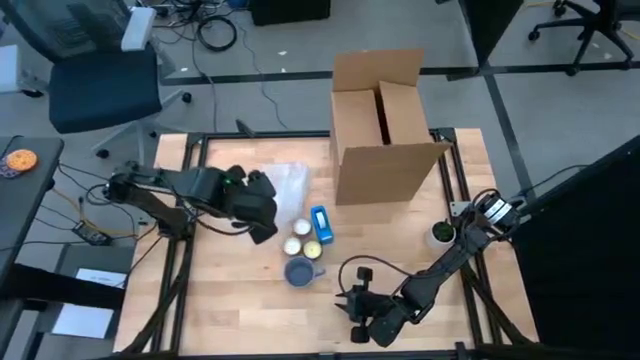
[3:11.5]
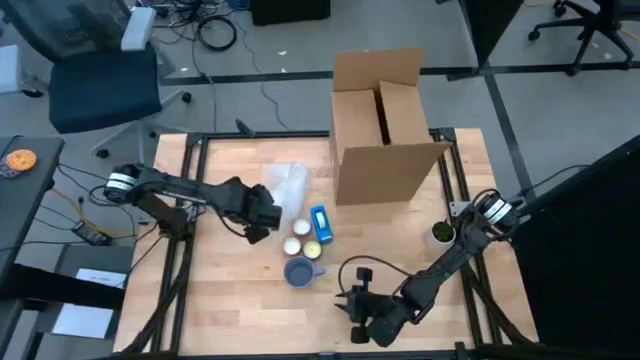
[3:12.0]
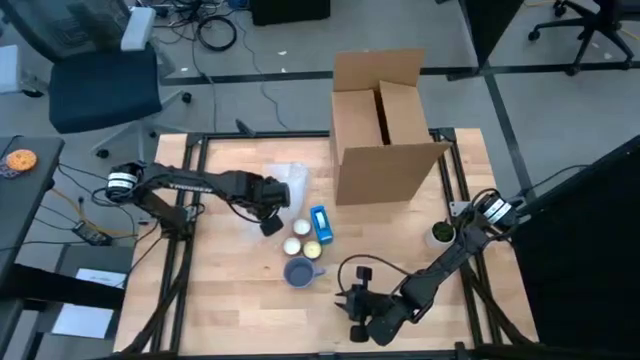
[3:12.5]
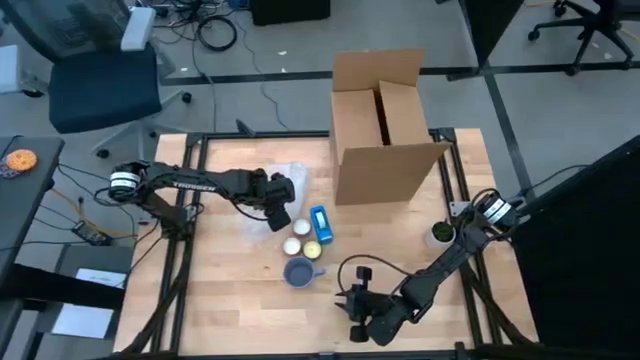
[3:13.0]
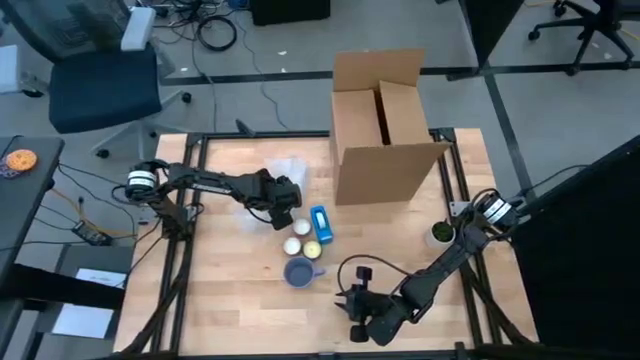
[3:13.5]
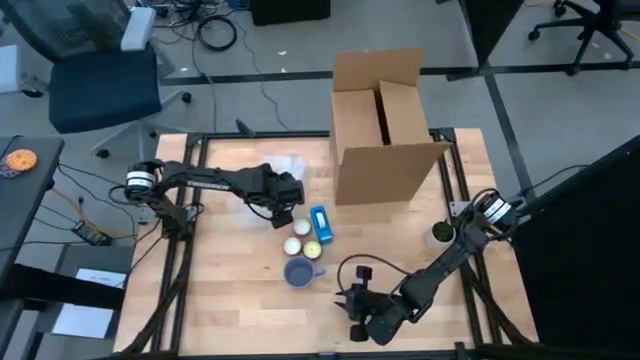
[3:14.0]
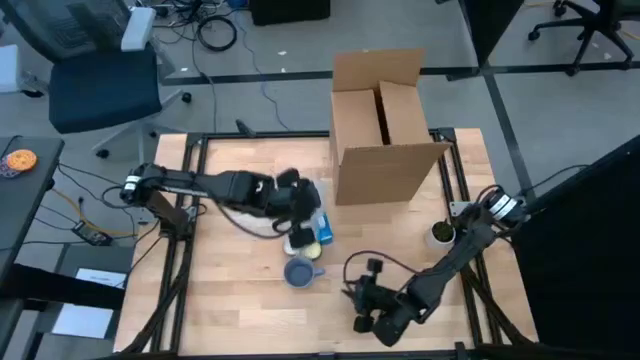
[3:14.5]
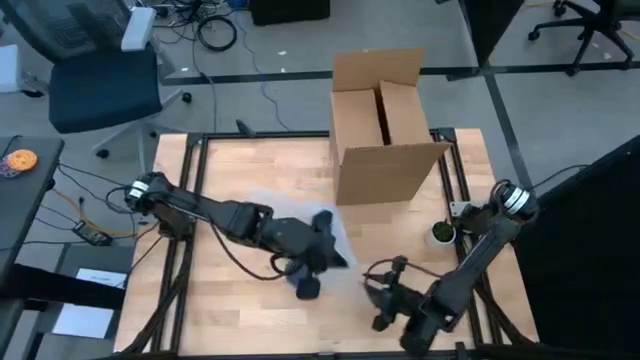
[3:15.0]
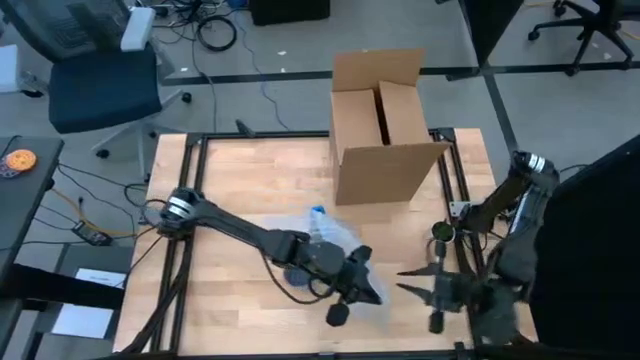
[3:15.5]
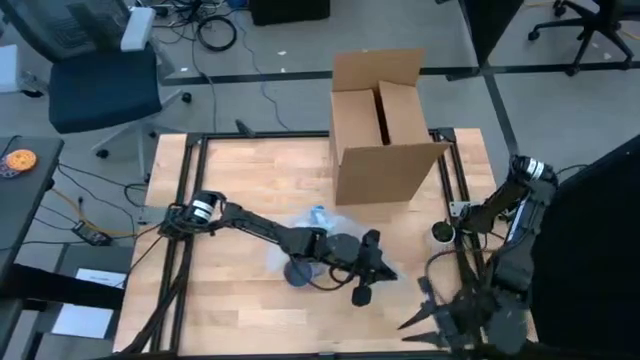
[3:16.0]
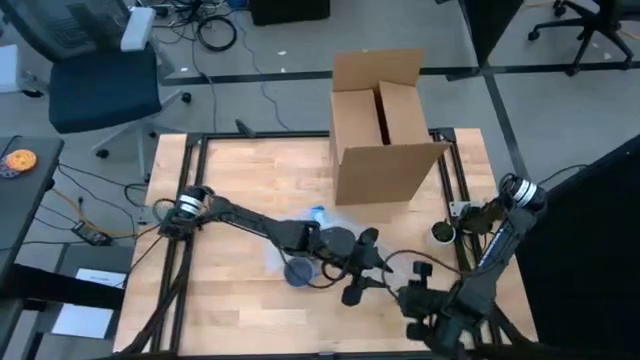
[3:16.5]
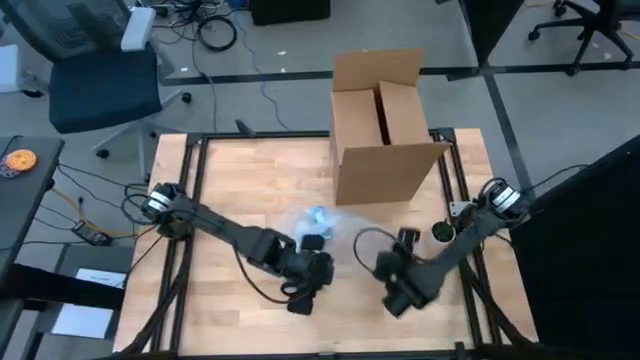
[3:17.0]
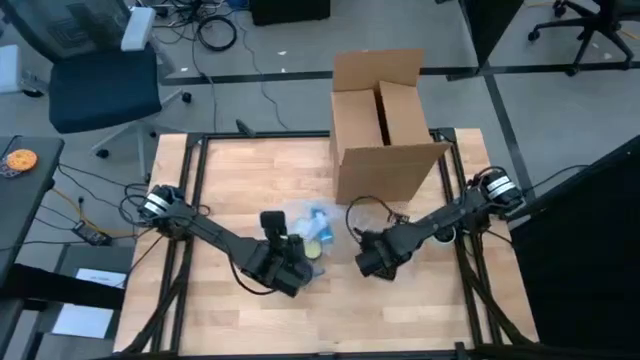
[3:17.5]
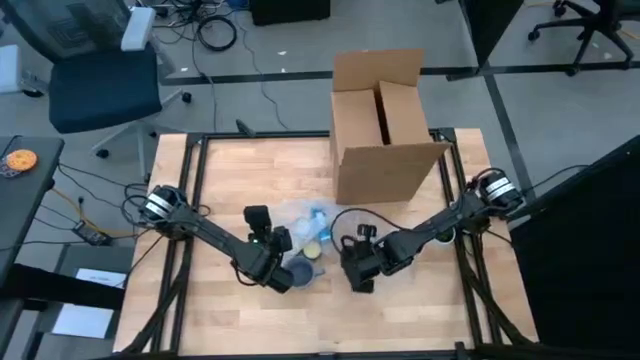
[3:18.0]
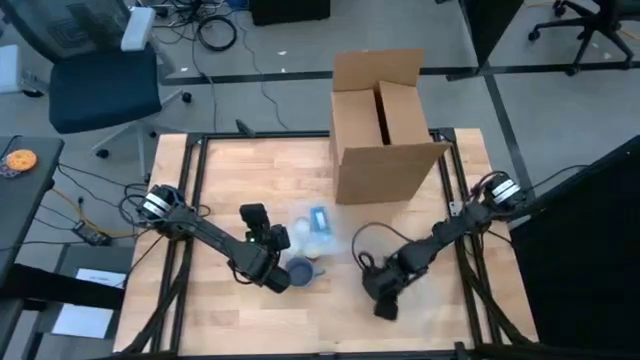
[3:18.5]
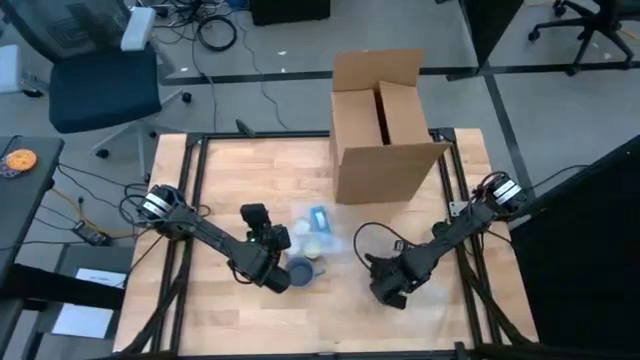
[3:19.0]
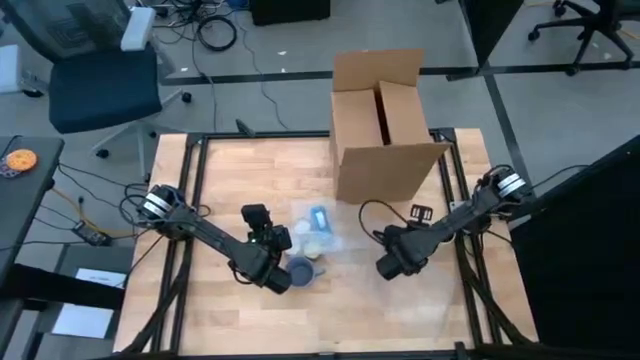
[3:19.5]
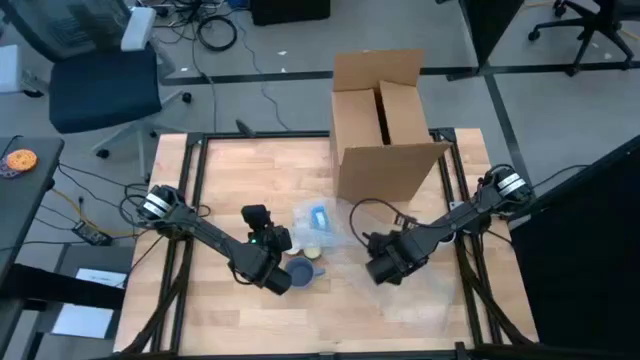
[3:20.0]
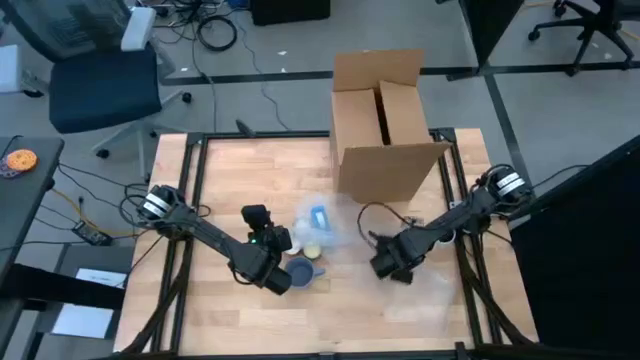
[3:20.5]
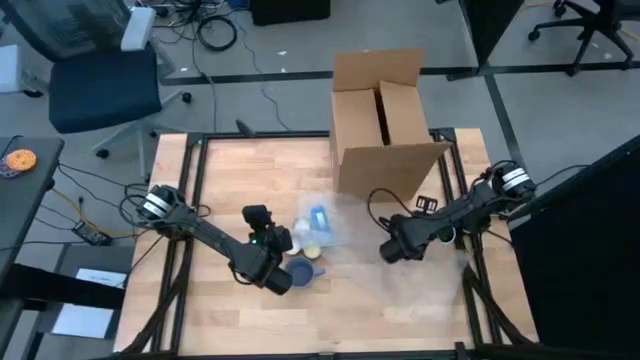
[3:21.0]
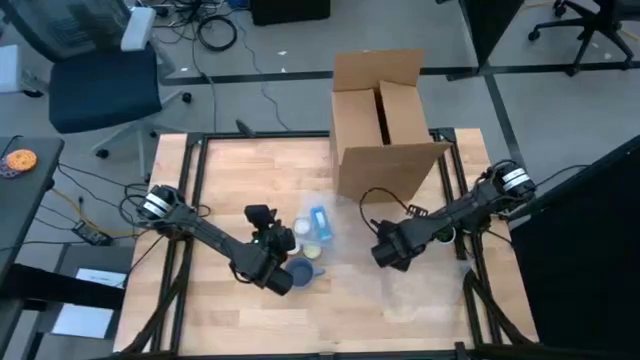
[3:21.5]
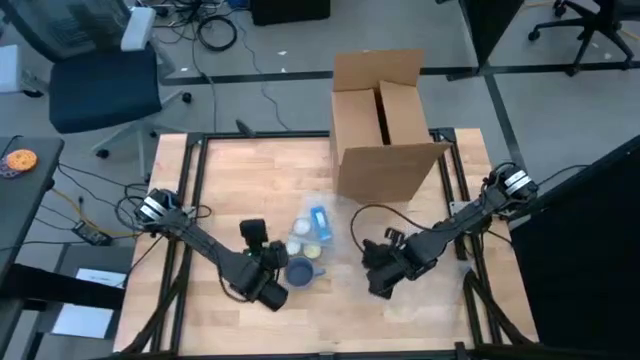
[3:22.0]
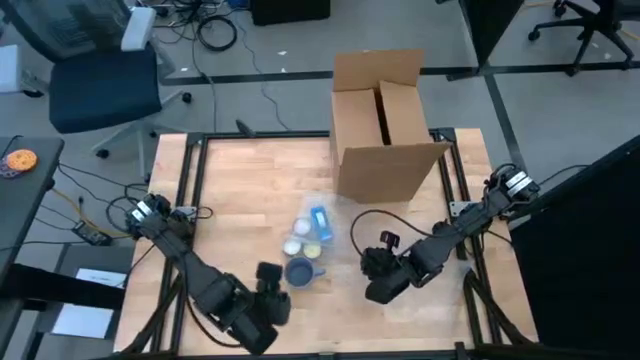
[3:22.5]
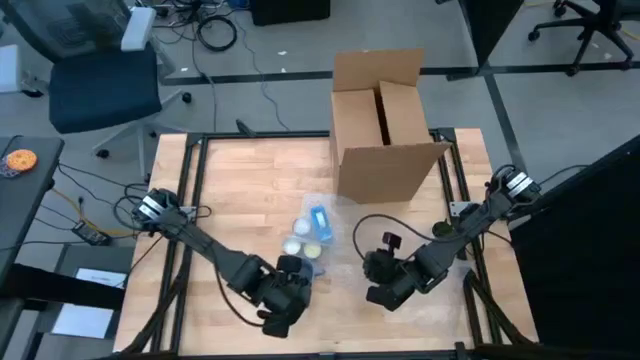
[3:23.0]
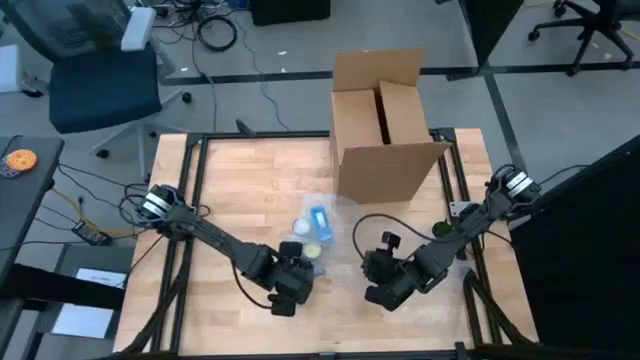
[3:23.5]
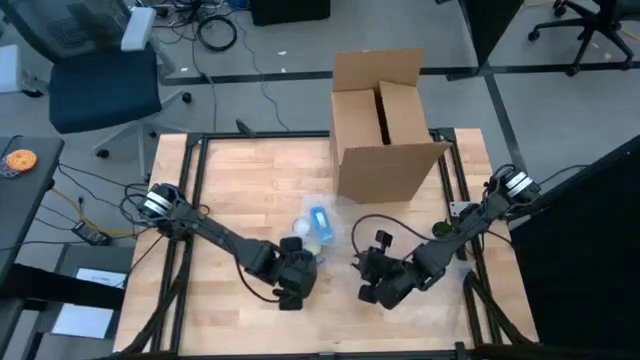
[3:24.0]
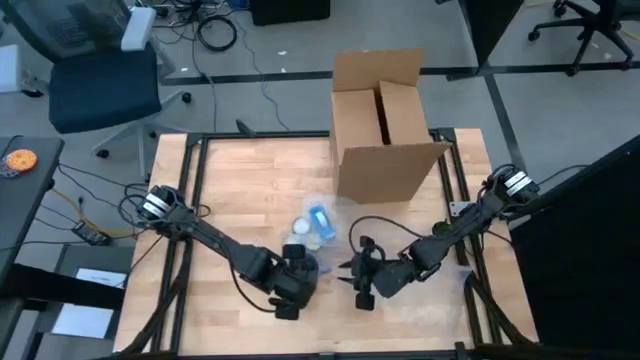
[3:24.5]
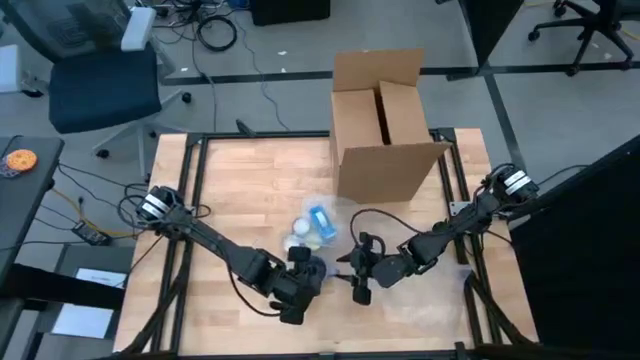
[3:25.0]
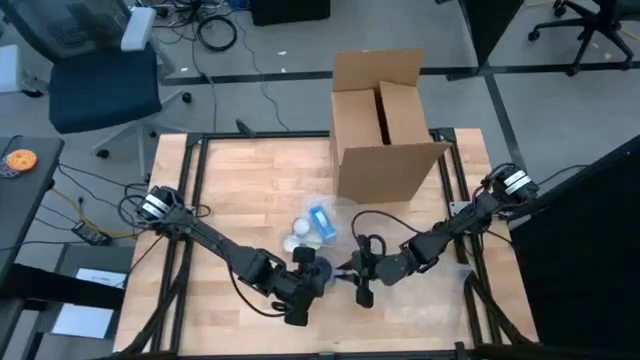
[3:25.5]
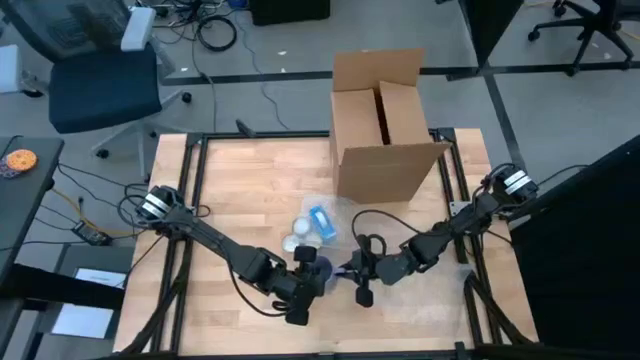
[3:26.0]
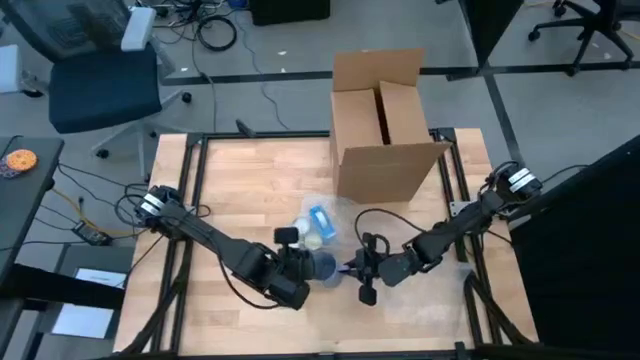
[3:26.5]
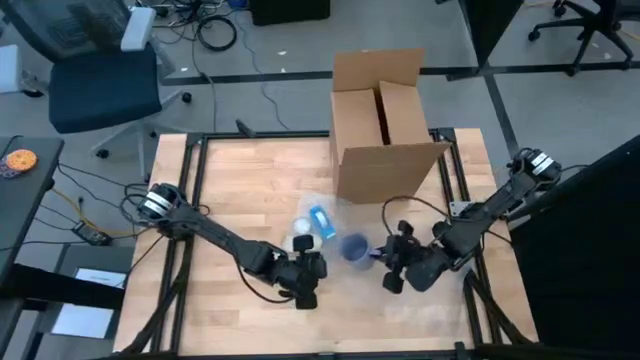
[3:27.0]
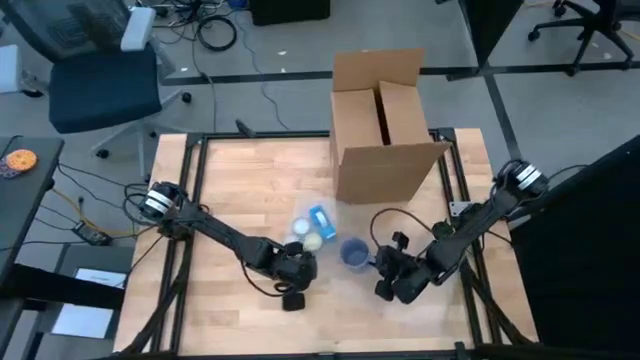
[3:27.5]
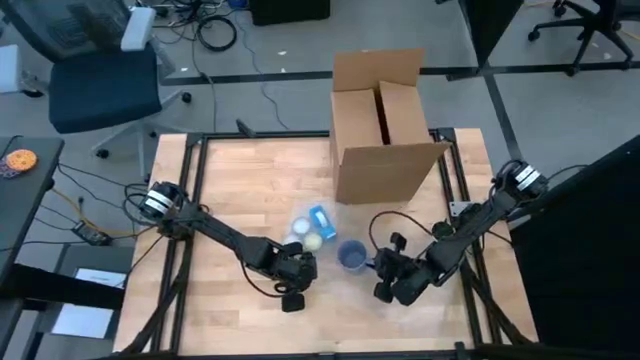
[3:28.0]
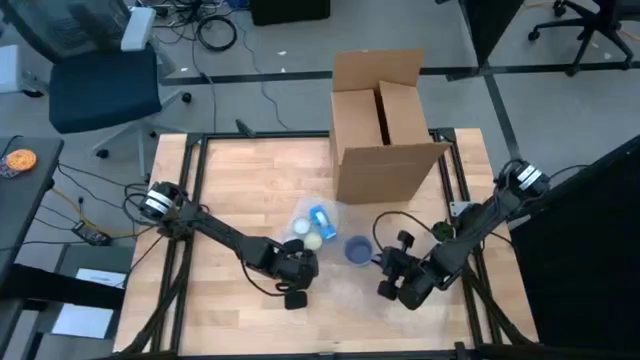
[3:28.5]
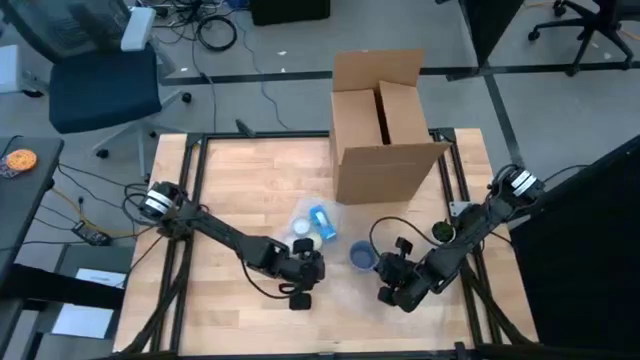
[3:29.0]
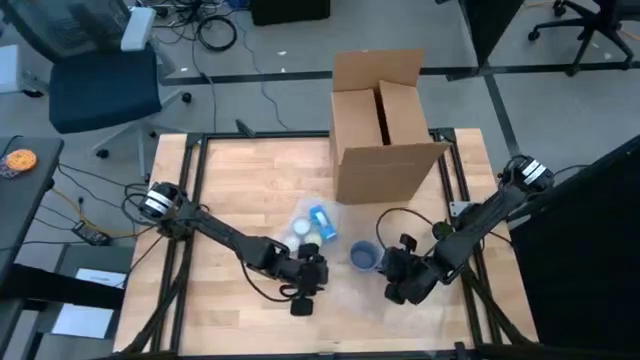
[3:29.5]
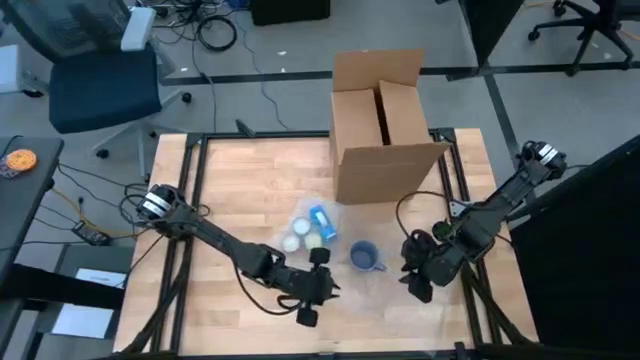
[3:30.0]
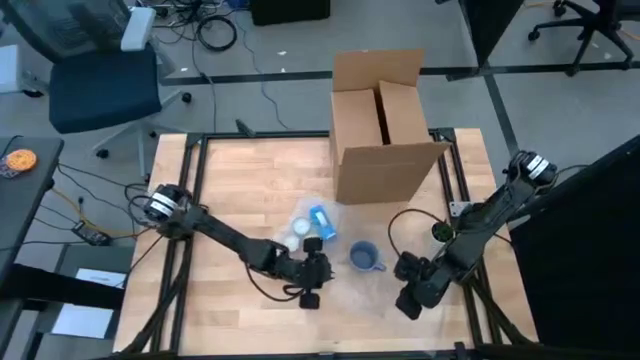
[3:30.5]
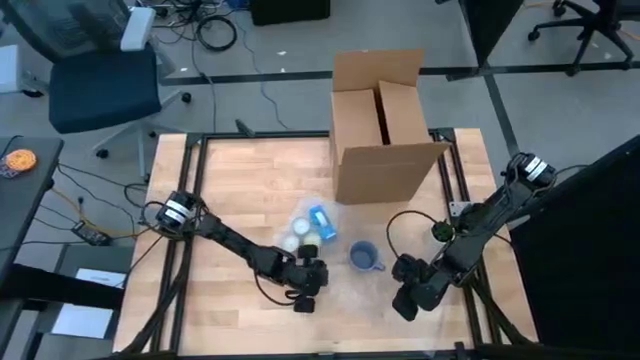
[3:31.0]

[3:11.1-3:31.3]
Task: wrap mug
Wrap the purple mug with the transparent bubble wrap
